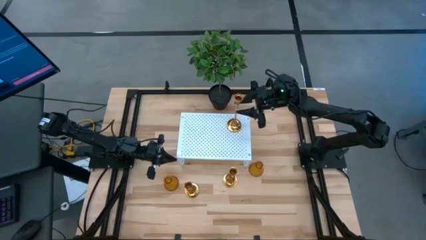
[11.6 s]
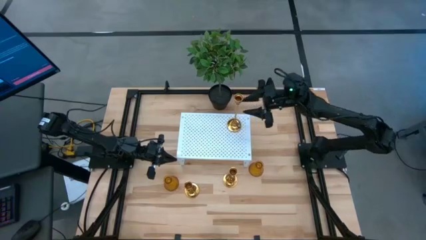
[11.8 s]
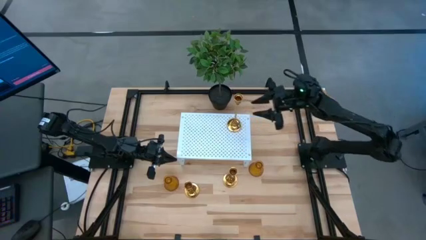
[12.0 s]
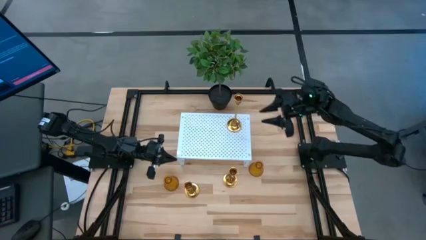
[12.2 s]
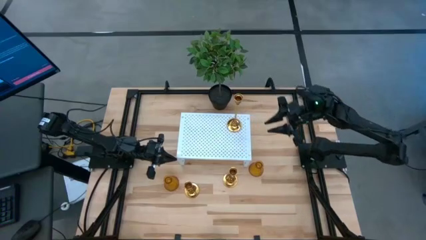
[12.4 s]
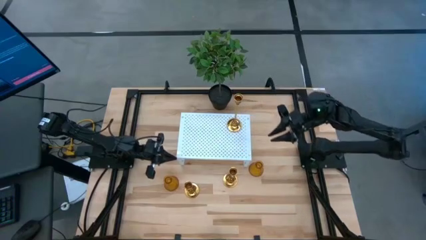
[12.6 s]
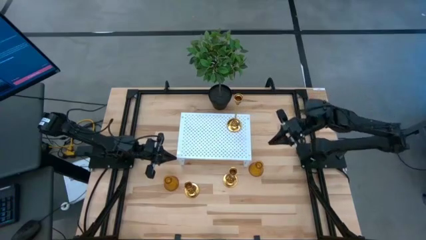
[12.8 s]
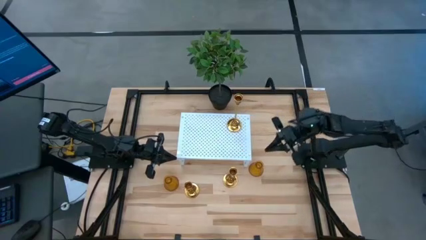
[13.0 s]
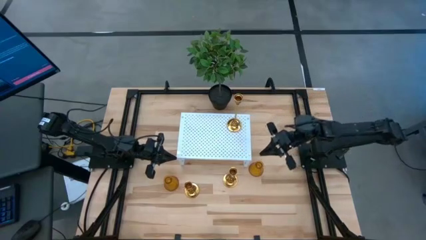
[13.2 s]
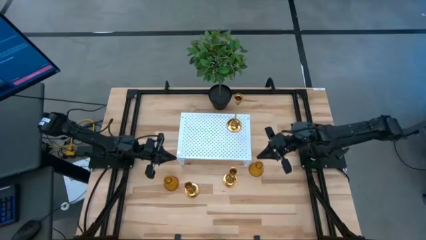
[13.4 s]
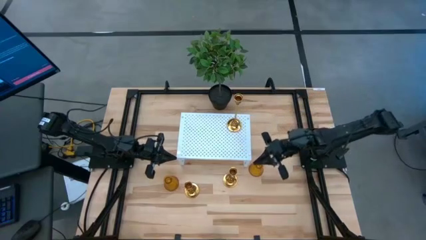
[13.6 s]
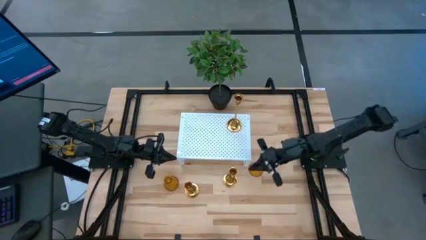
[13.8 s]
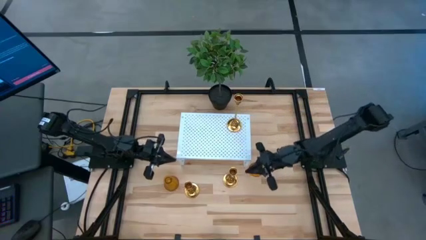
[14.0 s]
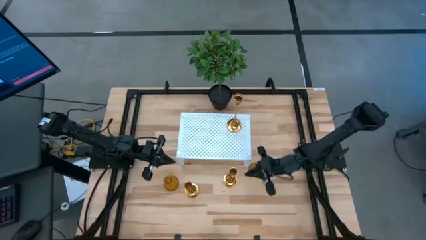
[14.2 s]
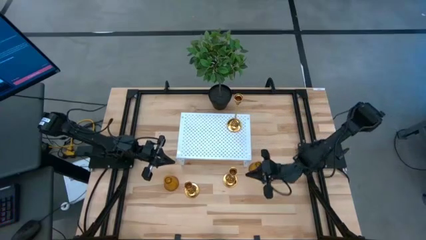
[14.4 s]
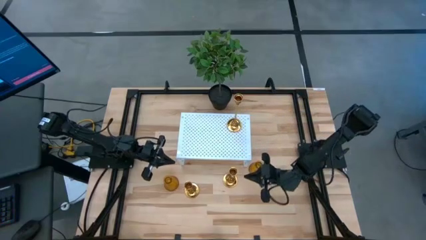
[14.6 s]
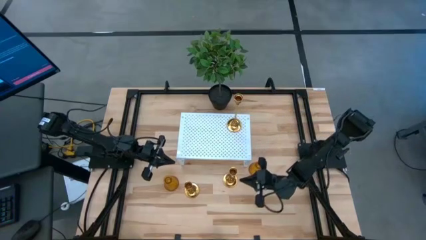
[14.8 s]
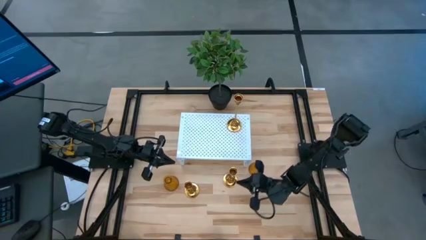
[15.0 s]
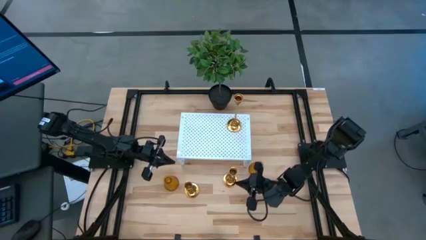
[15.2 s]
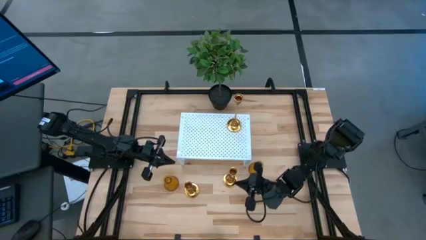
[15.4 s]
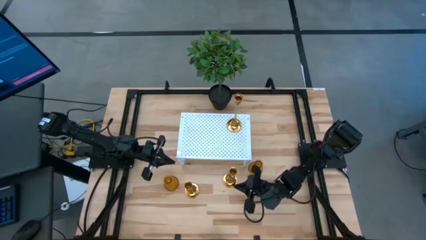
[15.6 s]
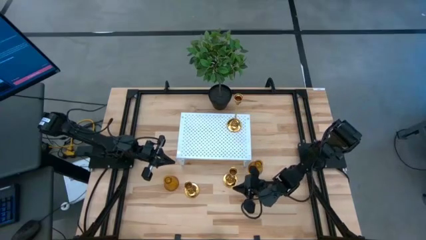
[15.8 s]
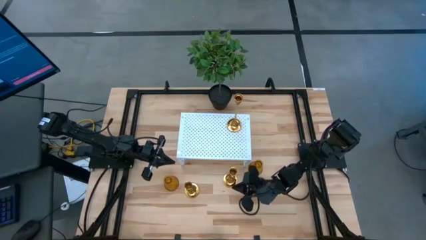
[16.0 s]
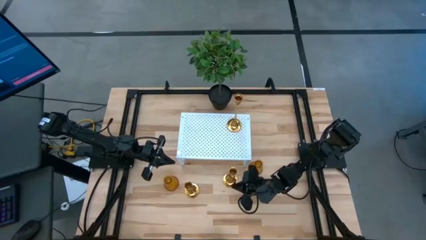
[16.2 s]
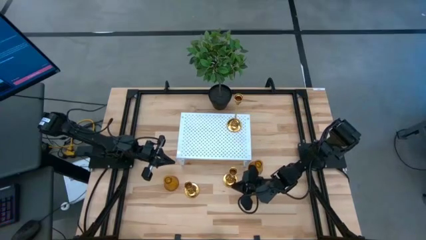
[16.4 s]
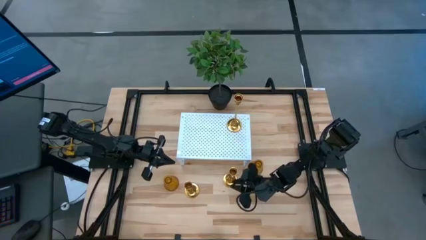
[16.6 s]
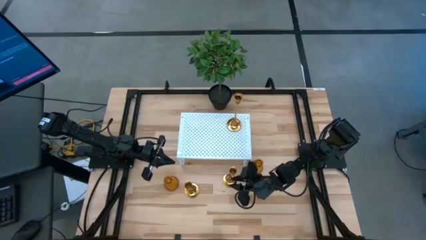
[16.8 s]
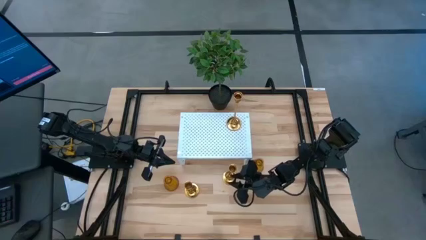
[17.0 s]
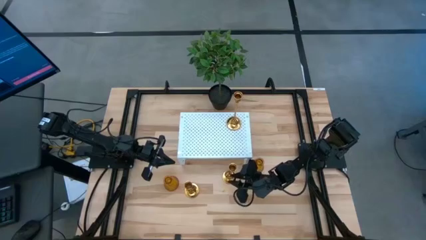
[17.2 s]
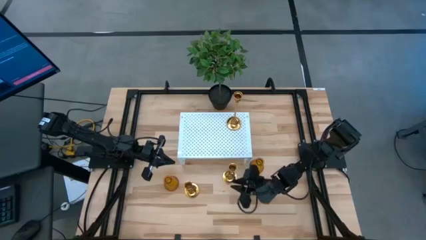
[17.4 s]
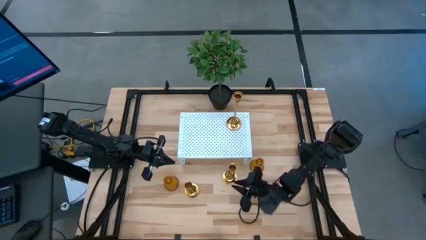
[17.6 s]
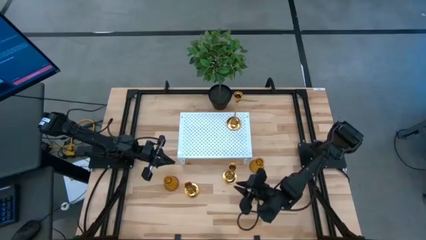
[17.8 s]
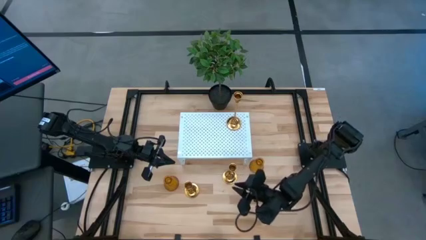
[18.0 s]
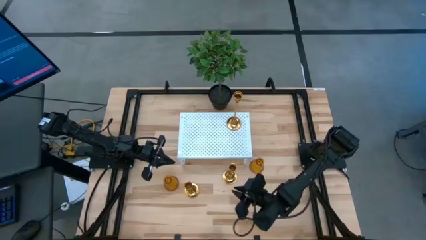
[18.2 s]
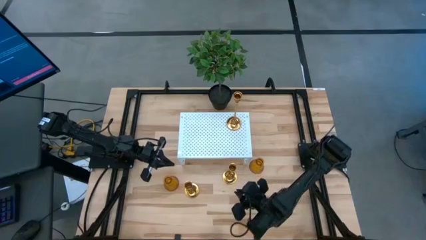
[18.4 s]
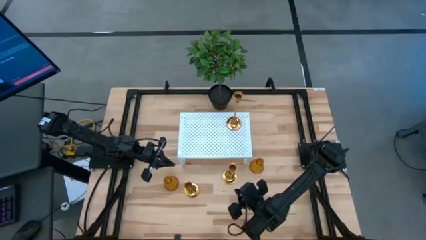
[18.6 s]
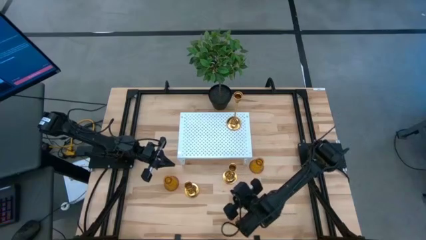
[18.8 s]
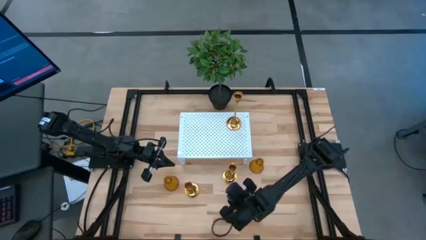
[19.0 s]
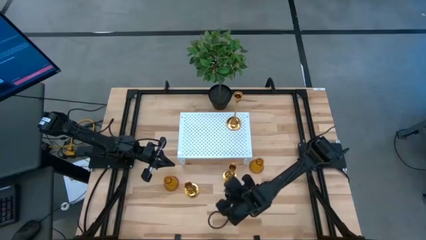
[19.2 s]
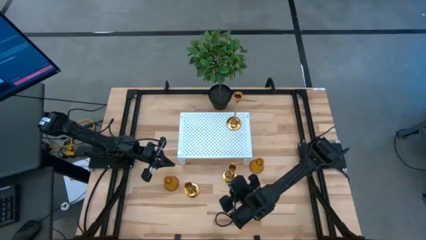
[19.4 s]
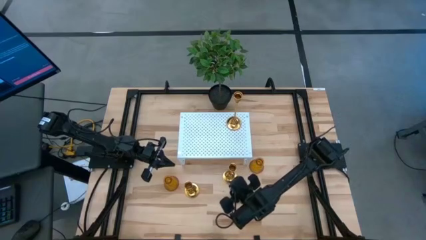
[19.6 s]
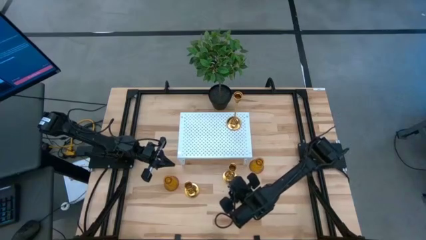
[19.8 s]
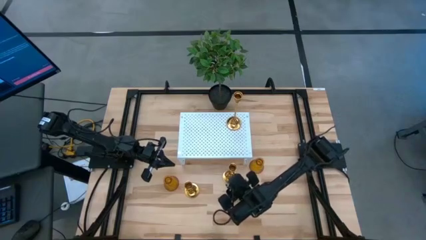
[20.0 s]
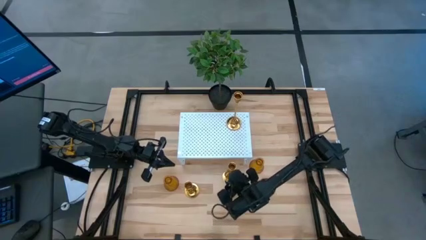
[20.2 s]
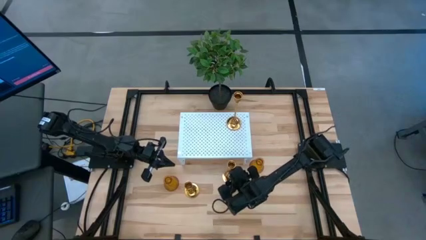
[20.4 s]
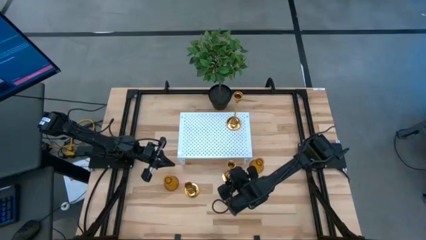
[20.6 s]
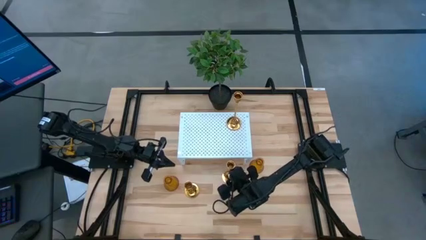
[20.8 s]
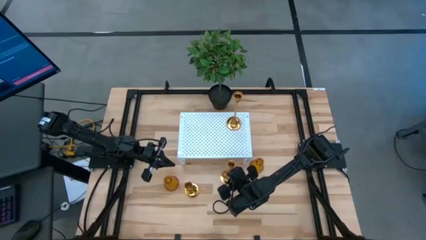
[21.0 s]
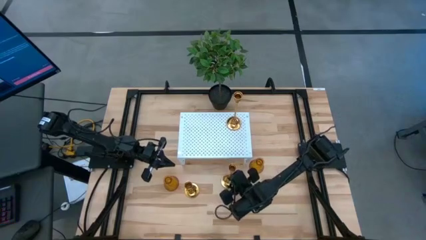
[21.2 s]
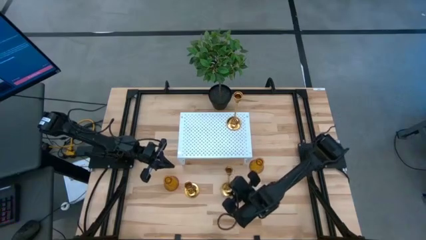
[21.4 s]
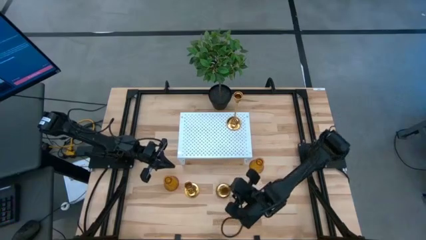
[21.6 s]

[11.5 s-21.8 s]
Task: Pick & Place candle stick holders
Put the right gold candle holder on the shelf

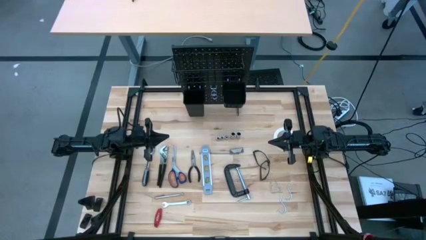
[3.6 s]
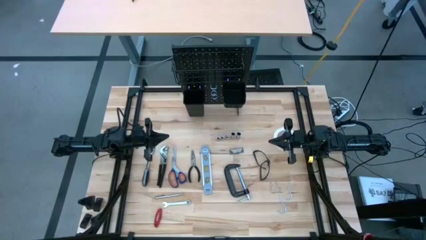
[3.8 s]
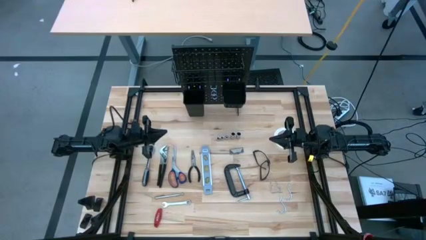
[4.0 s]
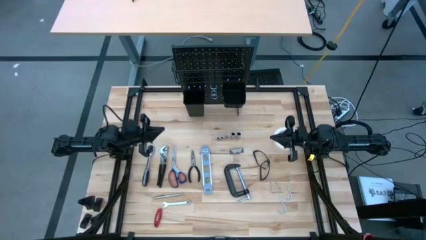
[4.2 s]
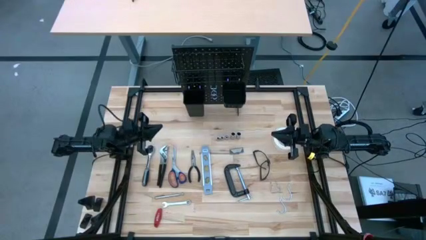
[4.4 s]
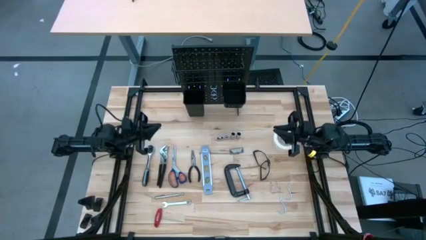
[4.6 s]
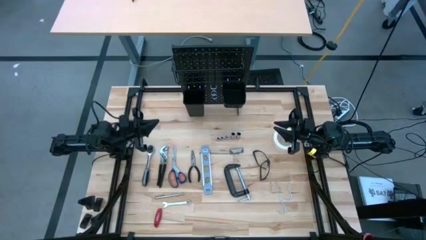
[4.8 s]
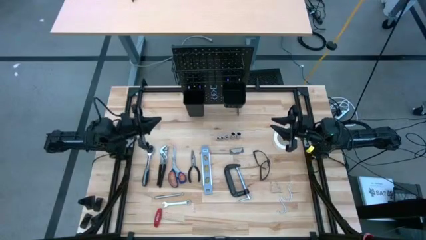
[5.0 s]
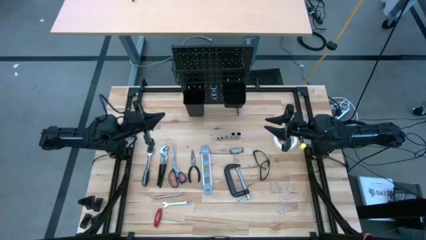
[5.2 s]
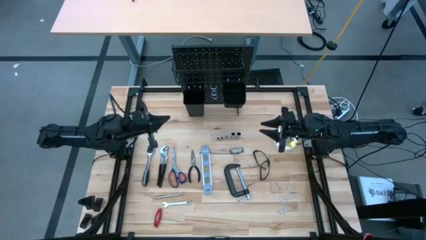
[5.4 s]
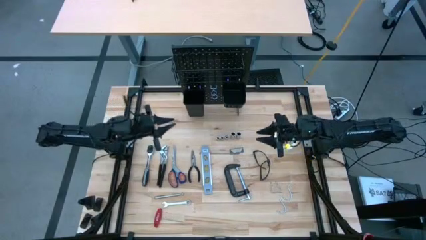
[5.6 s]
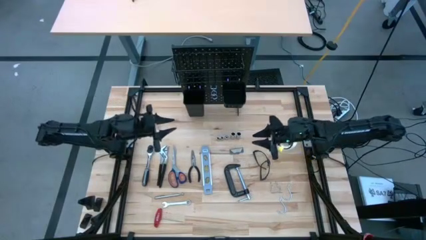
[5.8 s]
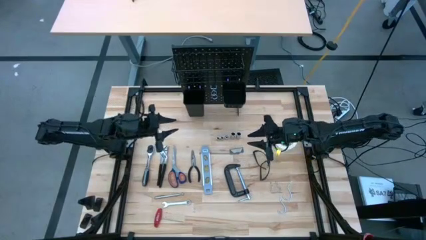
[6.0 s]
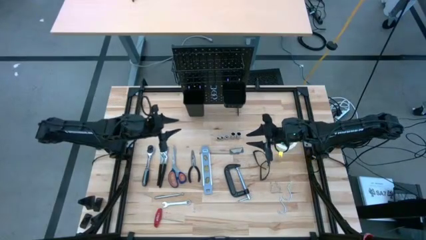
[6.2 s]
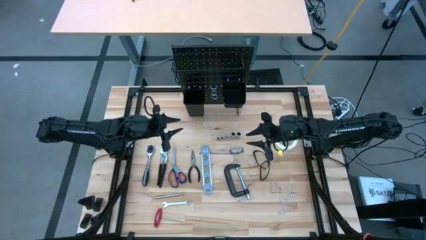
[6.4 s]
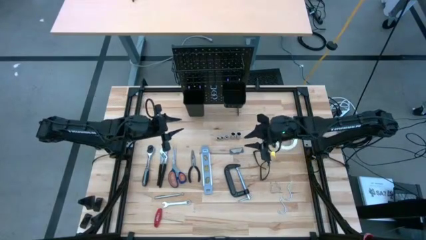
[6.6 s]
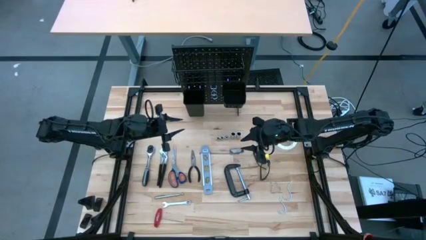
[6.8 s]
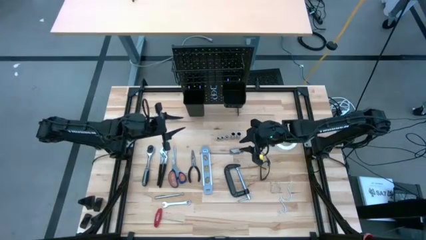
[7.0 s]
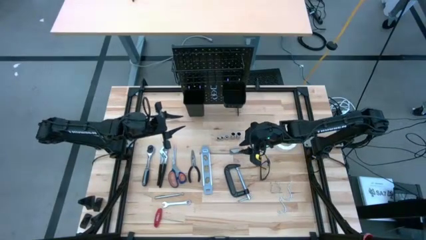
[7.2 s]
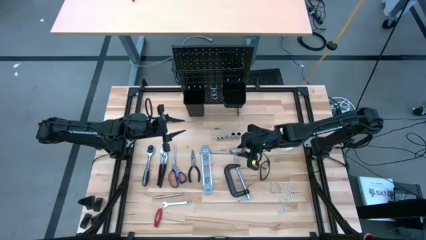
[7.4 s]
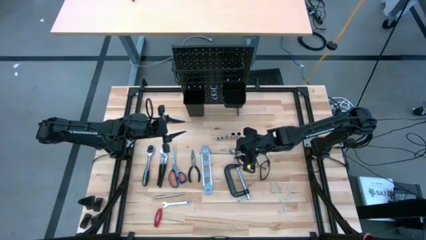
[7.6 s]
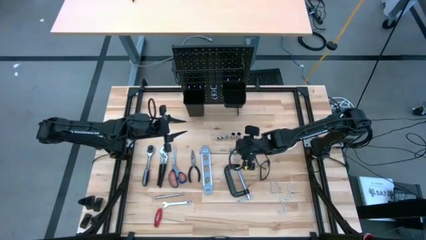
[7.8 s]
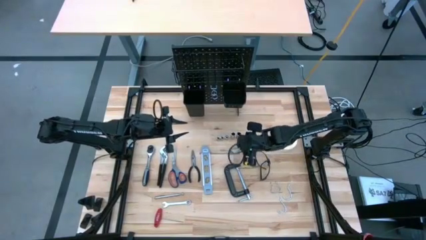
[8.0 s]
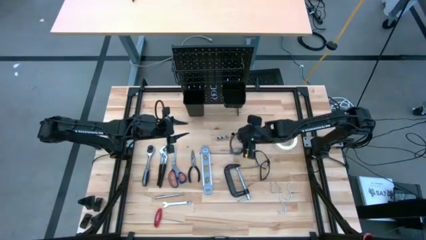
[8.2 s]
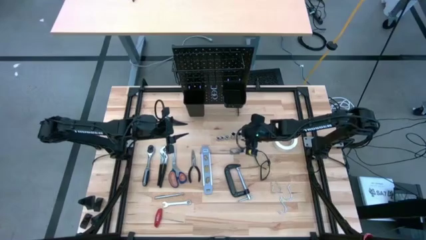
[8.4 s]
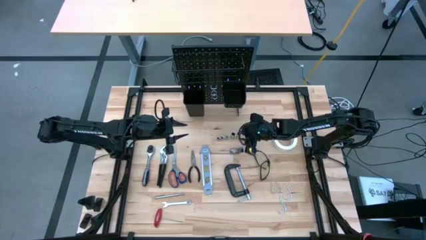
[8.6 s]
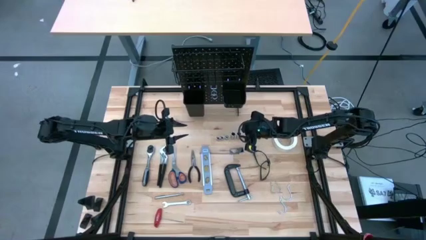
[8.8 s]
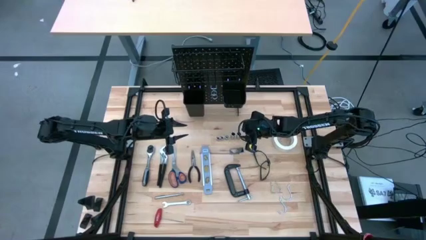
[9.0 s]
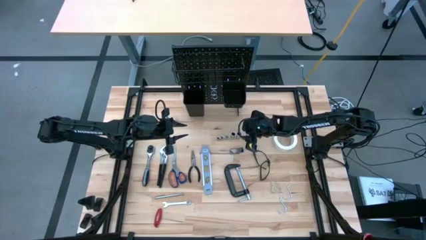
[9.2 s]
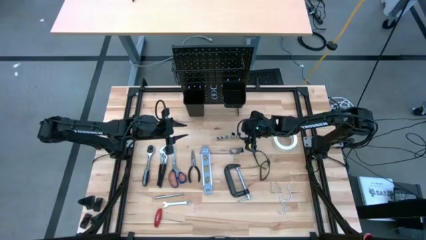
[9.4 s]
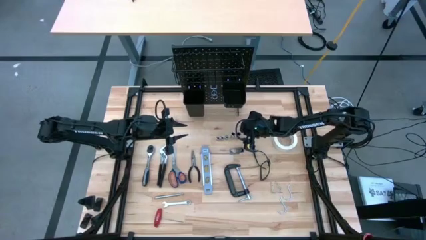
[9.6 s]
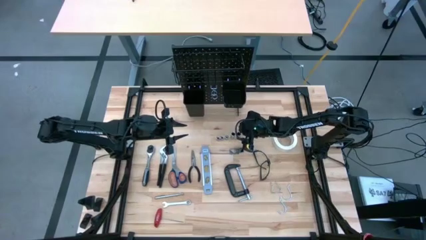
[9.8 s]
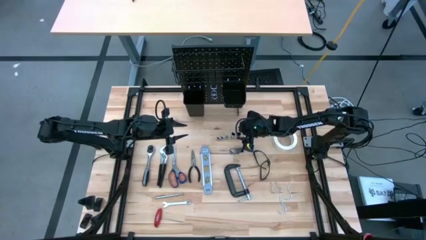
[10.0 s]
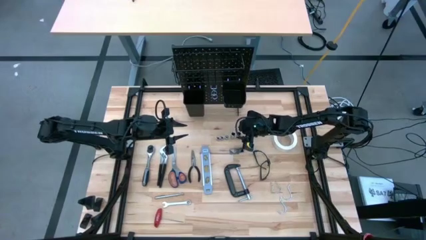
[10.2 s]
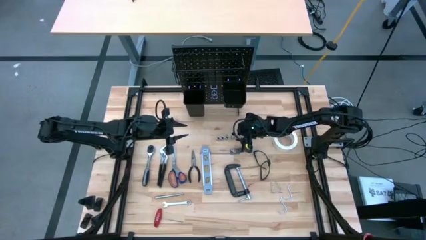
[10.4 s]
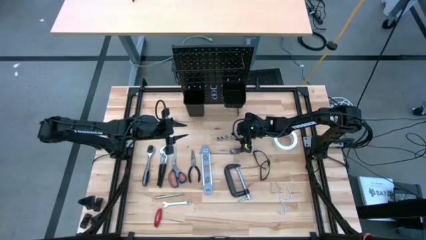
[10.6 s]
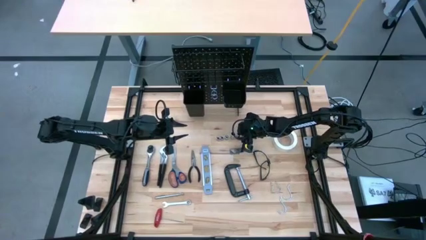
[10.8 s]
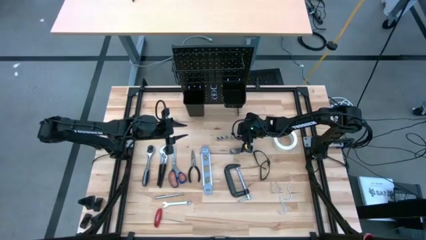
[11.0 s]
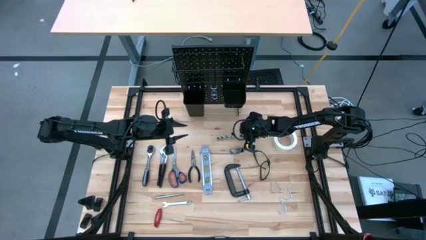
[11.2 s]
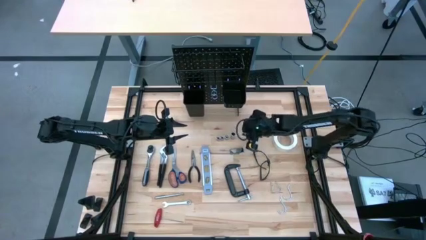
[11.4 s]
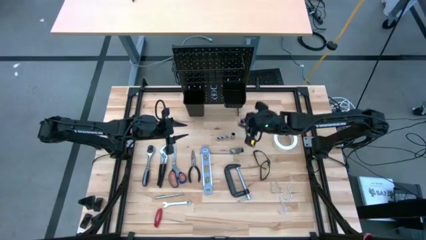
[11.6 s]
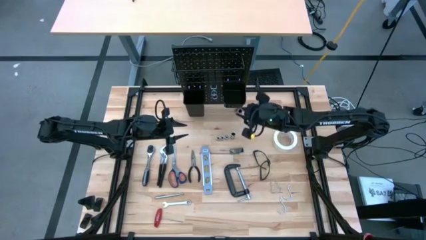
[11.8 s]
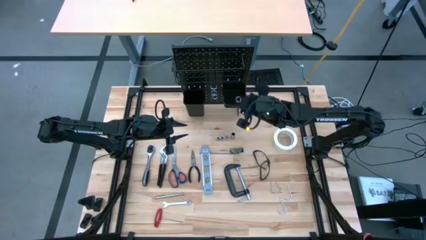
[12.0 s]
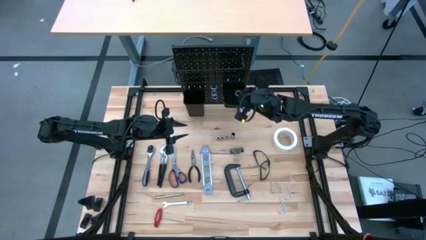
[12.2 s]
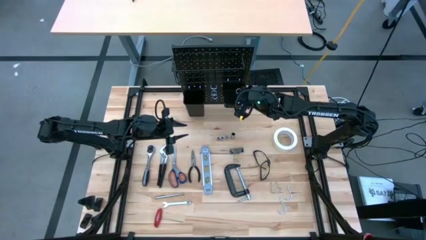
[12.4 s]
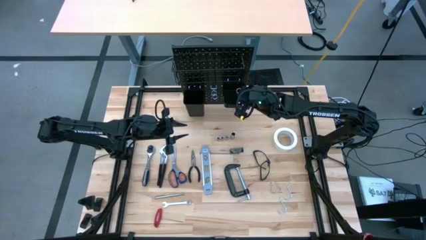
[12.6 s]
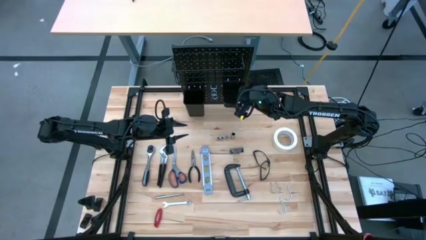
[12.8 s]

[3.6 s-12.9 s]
Task: Hang tools onto peg board
Put the right large socket into the right black bin on the peg board
